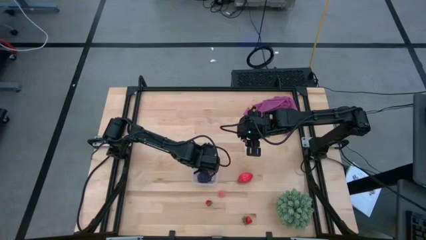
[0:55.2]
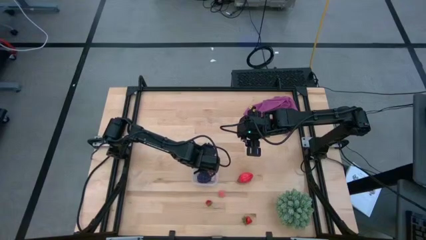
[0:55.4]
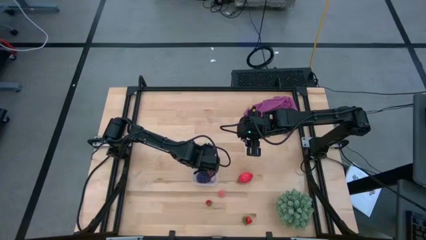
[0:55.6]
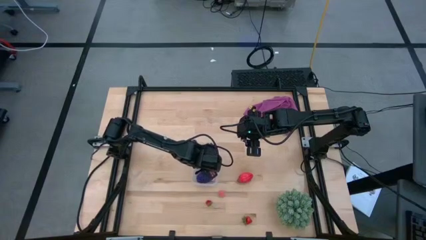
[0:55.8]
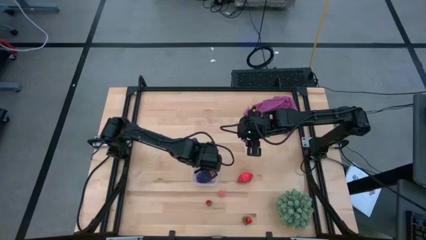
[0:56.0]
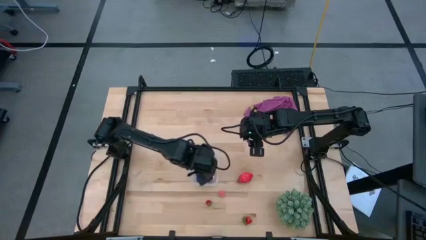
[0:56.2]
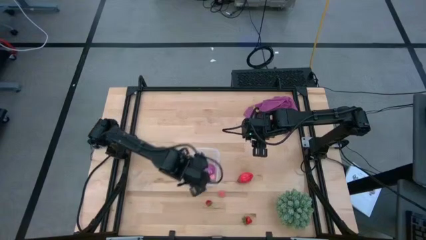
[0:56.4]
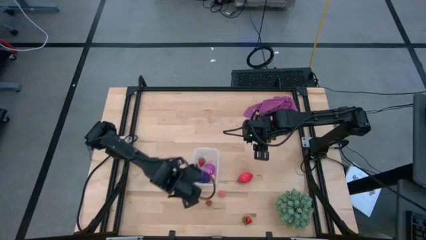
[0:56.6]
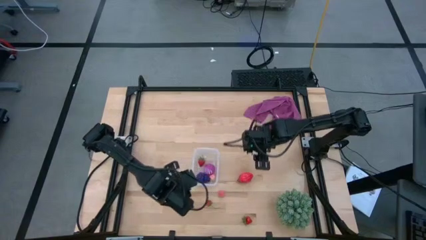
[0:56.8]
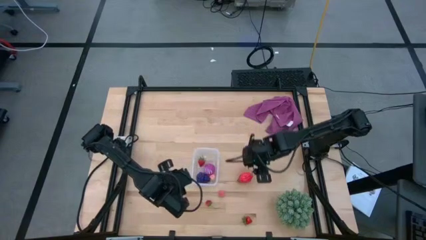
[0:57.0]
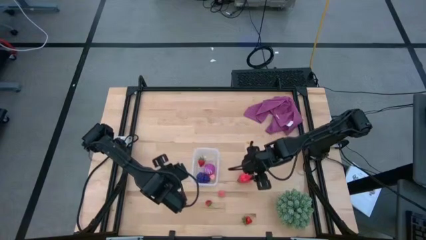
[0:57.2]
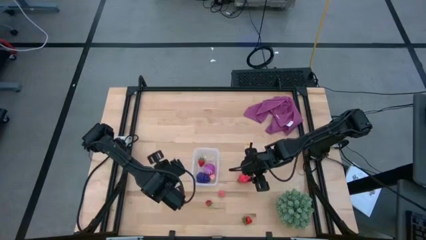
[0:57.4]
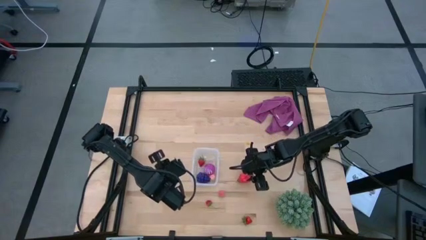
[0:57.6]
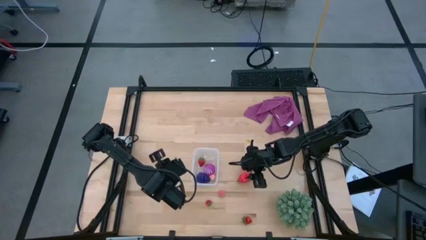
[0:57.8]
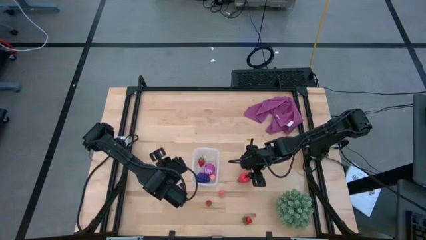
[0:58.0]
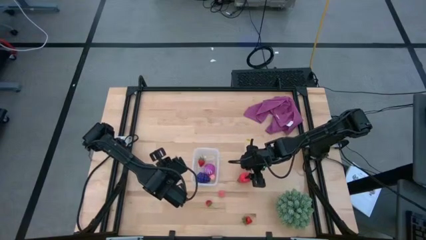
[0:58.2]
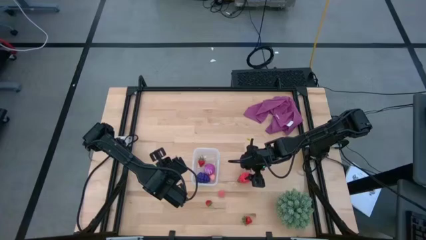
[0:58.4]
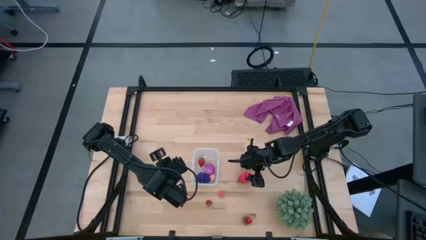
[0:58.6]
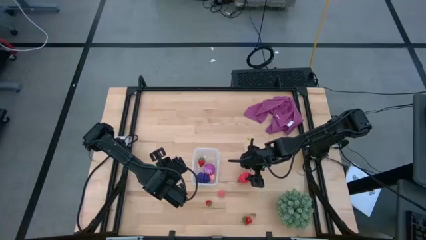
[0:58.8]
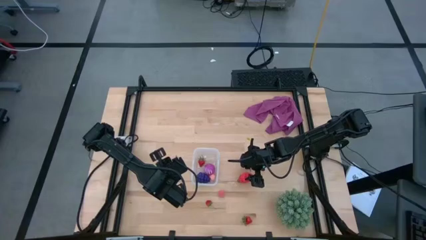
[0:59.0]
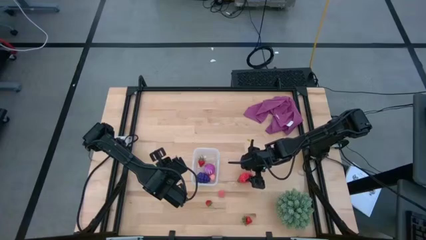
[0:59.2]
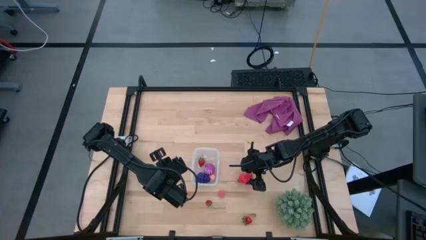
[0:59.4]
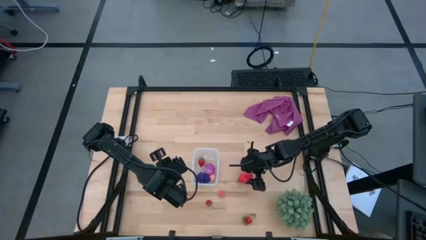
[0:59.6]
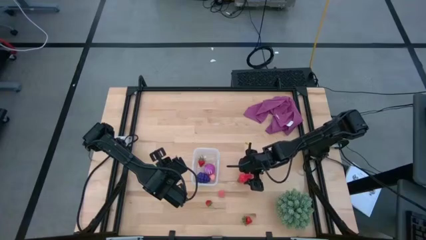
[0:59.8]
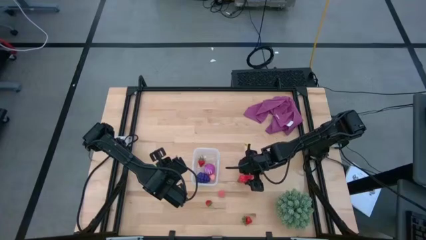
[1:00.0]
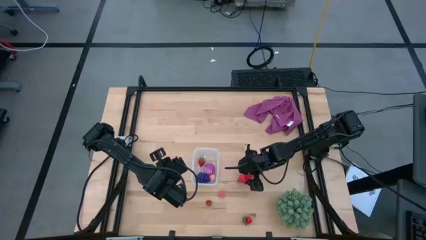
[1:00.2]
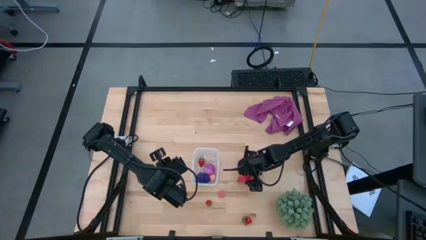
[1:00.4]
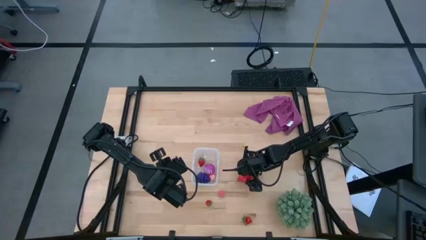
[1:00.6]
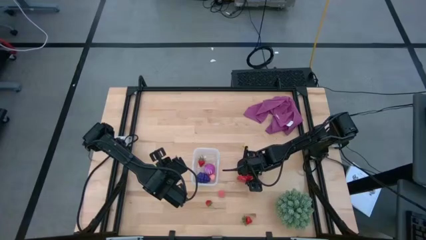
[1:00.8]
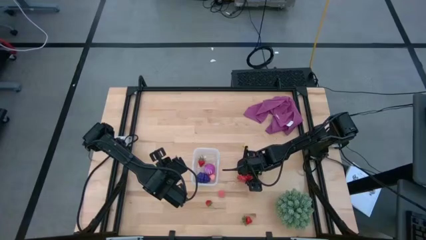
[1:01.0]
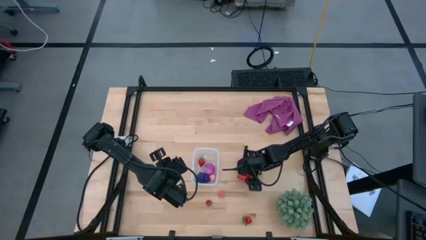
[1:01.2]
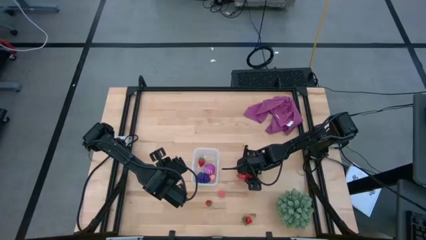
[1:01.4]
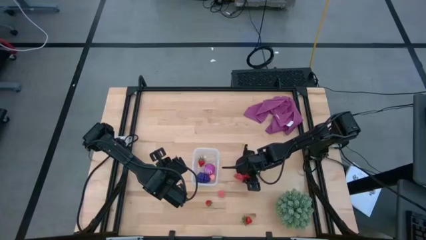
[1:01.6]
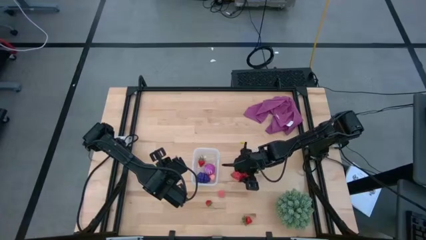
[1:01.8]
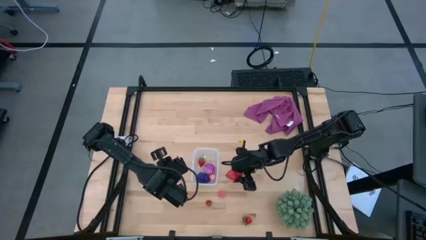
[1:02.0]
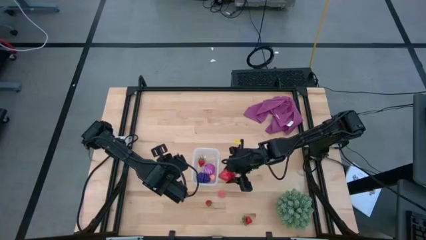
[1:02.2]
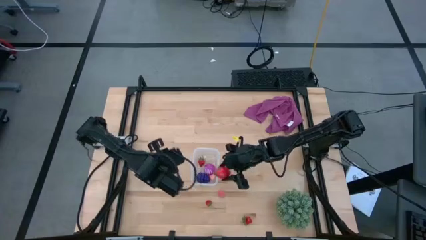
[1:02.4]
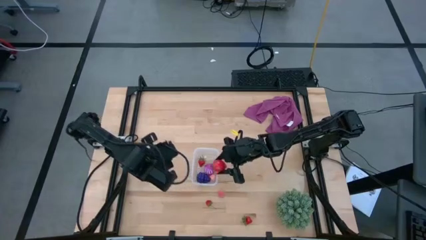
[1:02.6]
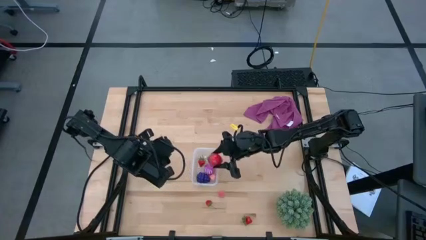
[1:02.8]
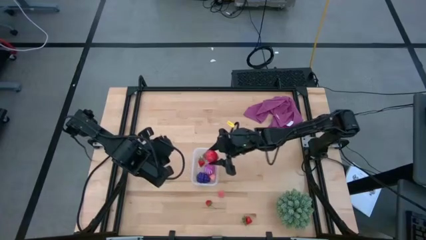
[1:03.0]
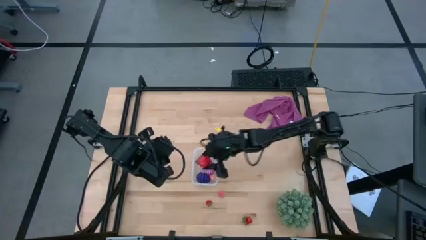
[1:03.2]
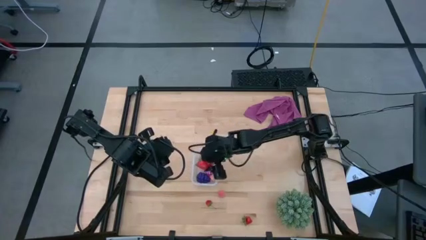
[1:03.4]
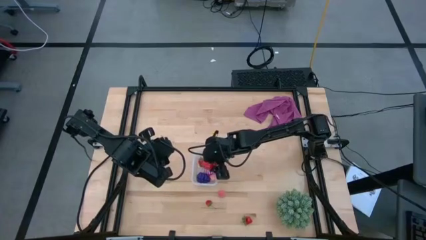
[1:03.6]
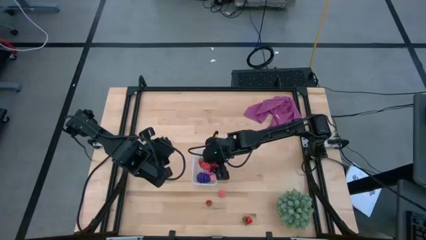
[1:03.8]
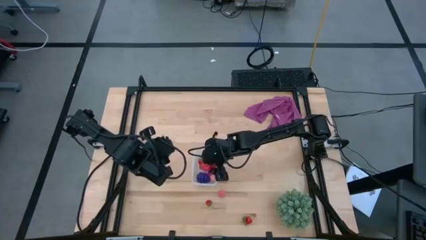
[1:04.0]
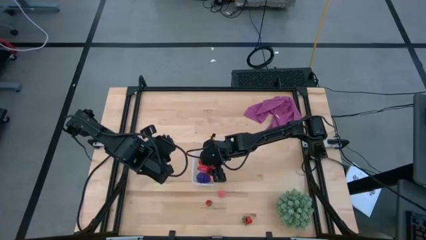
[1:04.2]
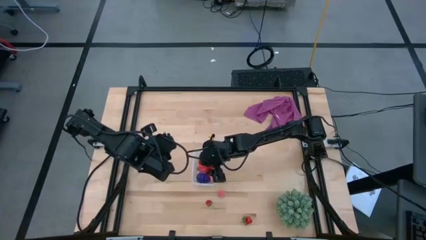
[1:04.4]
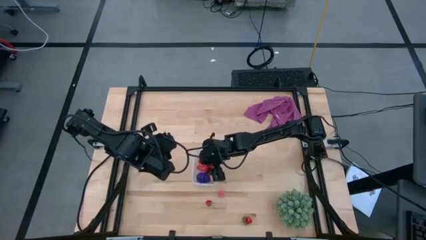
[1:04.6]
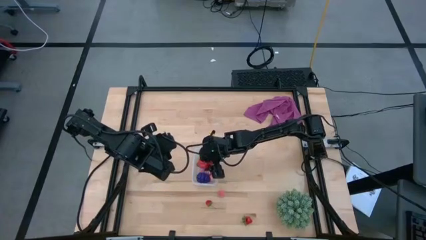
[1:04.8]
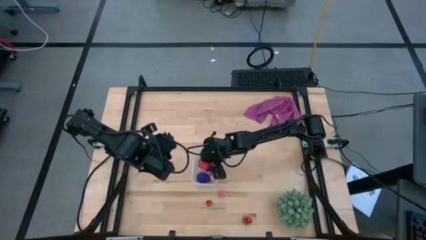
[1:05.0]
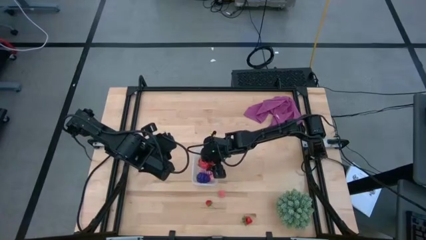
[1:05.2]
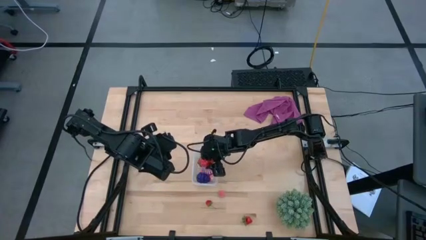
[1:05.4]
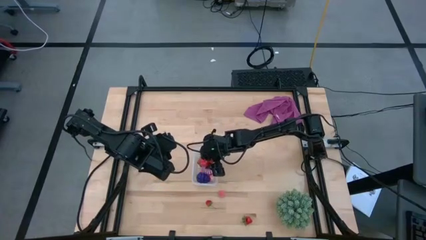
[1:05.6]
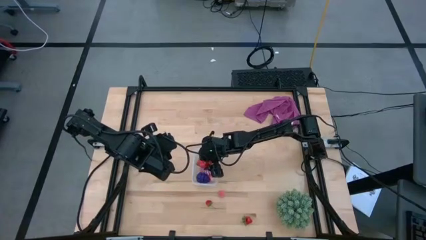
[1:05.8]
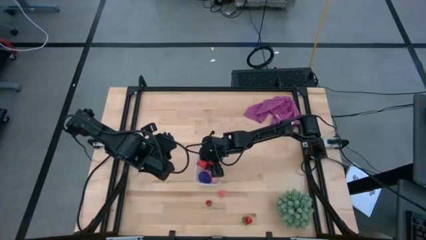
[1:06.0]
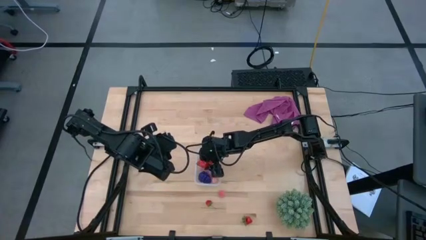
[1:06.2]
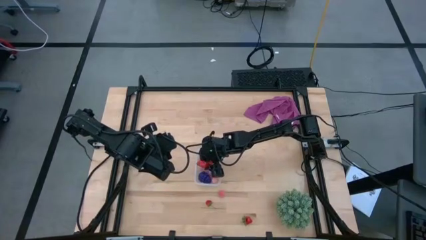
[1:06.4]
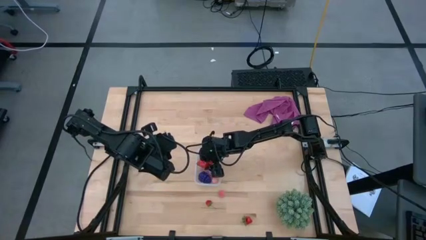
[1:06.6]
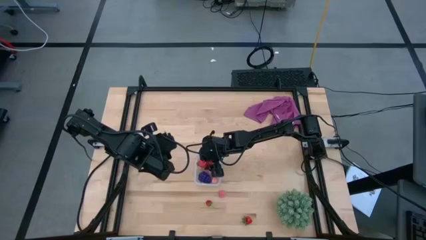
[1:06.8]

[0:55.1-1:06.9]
Task: Pick and placing Produce into tupperware
Put the pink dragon fruit into the transparent bin
